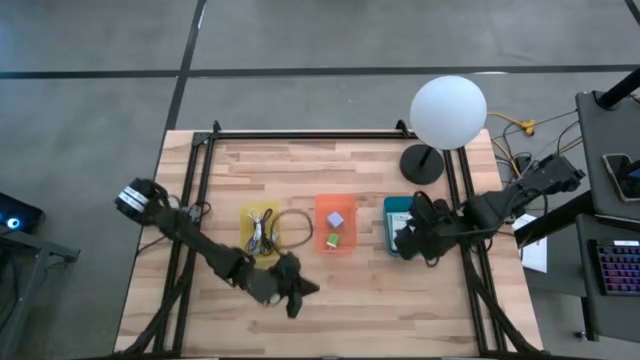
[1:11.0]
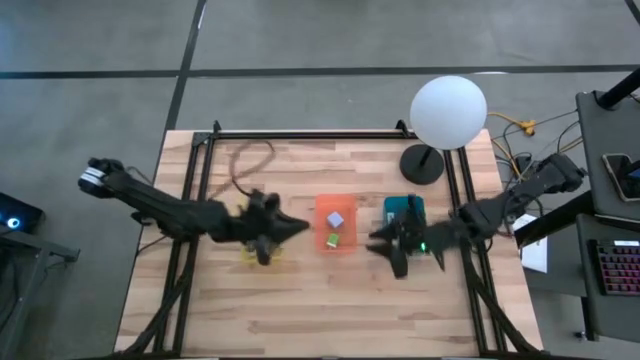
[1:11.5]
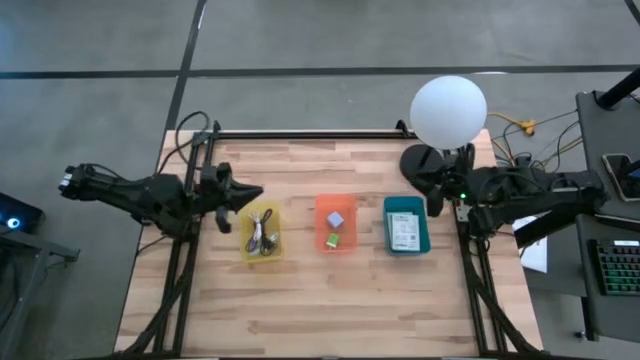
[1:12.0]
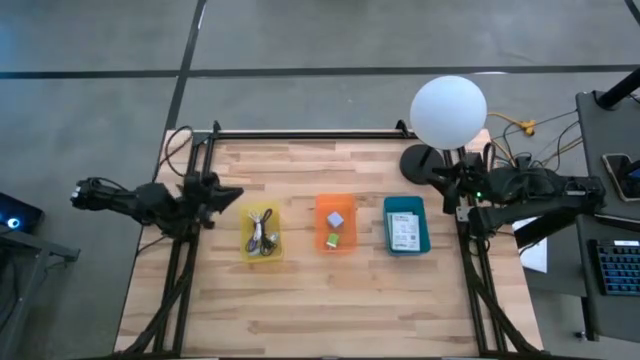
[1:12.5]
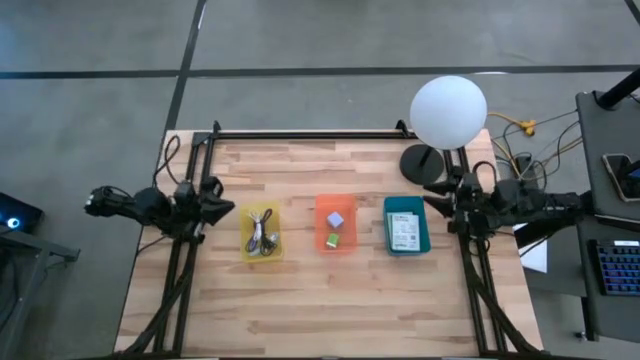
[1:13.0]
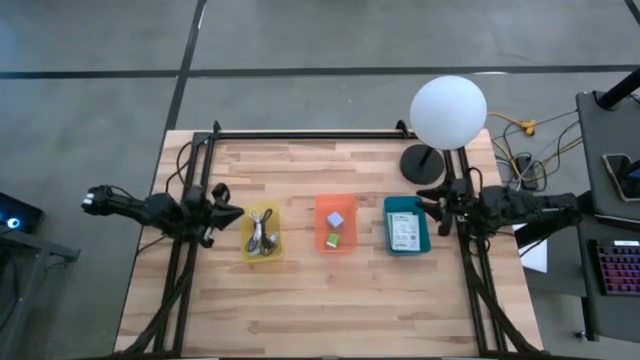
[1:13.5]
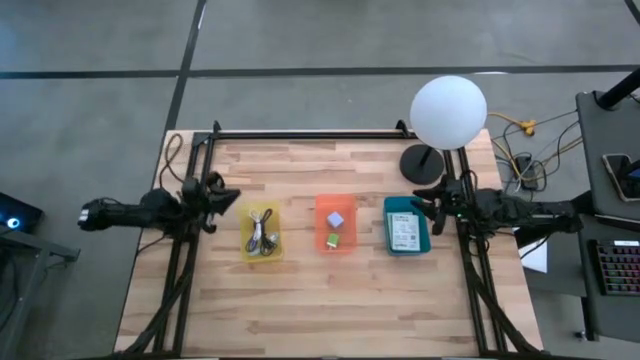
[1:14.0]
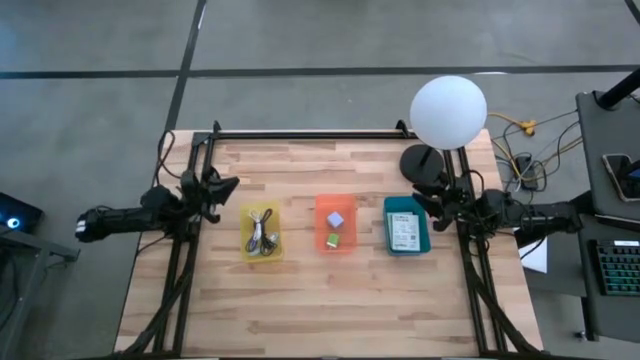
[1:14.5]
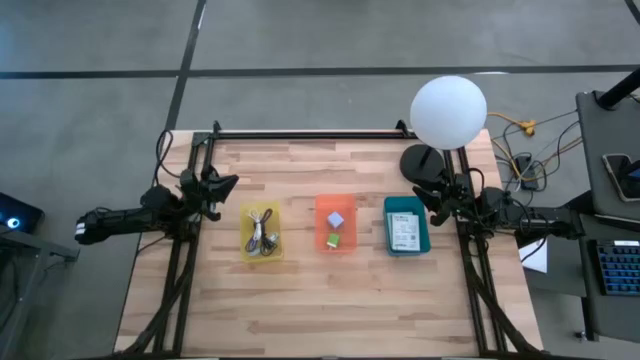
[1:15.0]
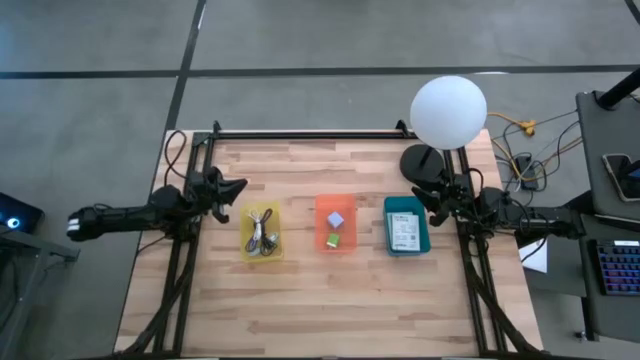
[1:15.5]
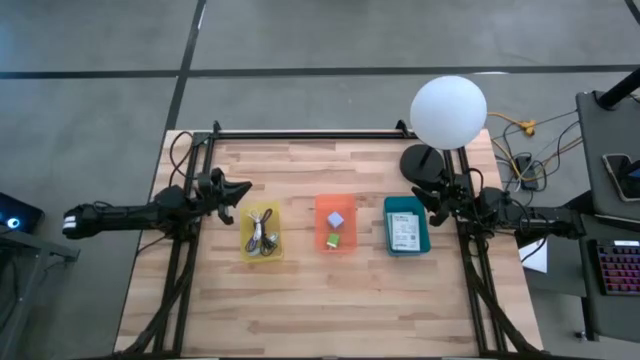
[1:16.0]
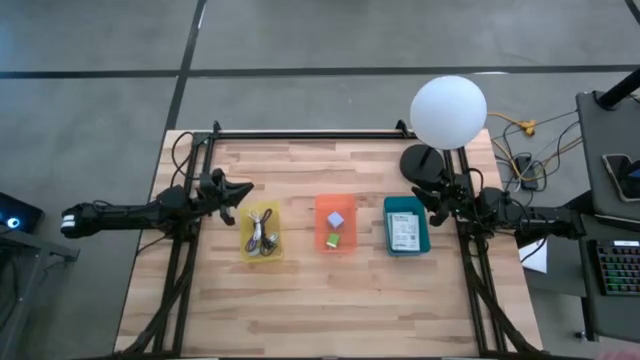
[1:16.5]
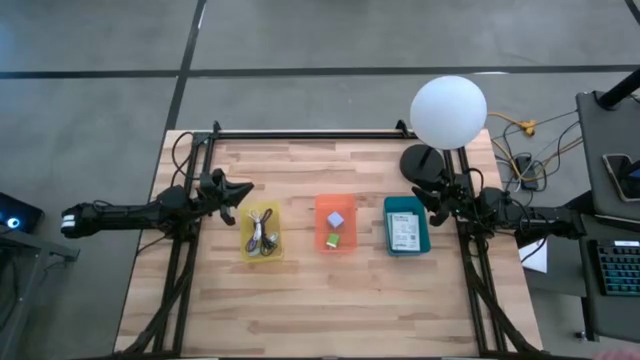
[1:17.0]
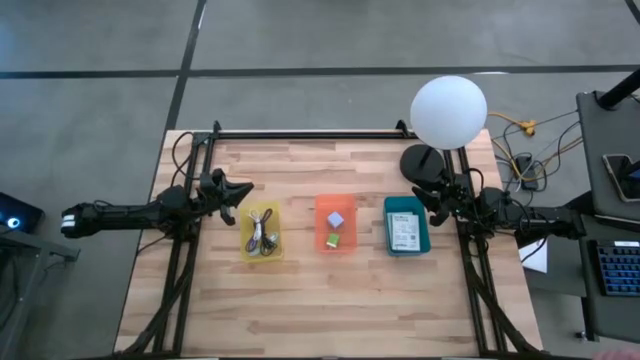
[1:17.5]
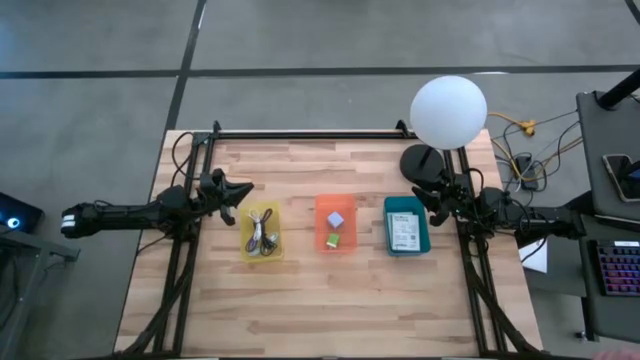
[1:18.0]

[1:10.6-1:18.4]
Task: Pick and place items into bin
Return to Home Position

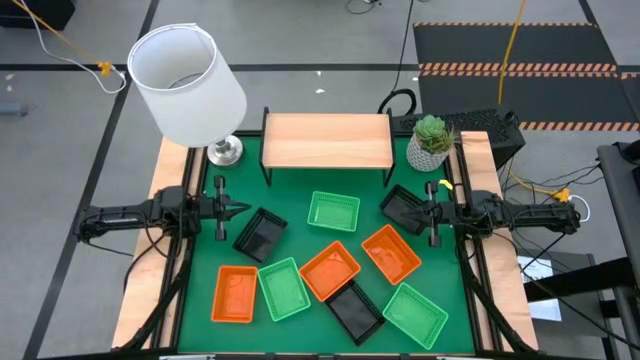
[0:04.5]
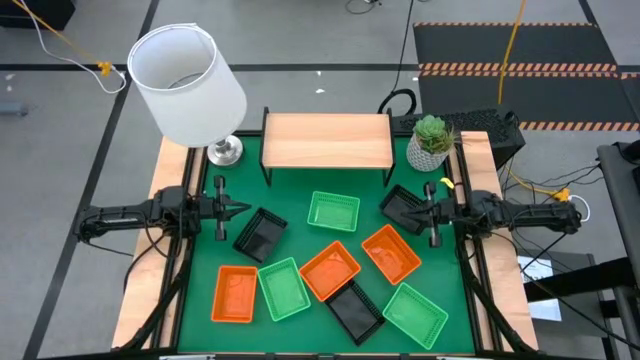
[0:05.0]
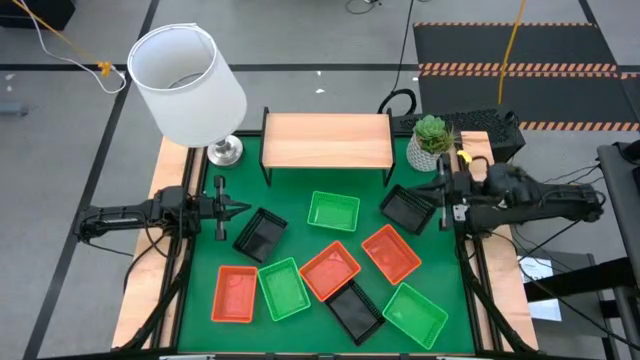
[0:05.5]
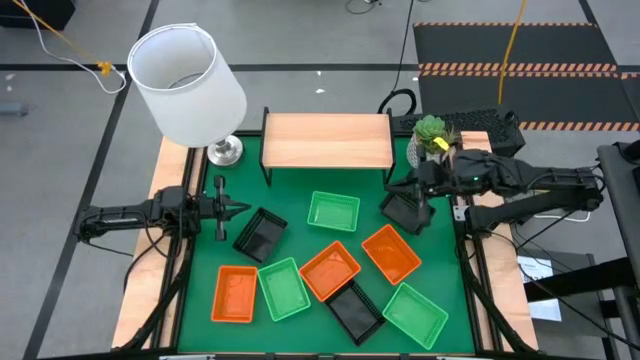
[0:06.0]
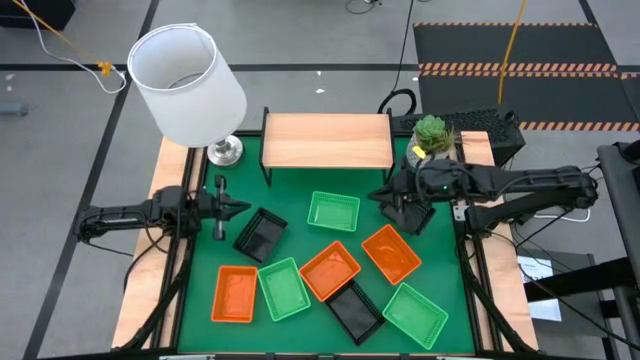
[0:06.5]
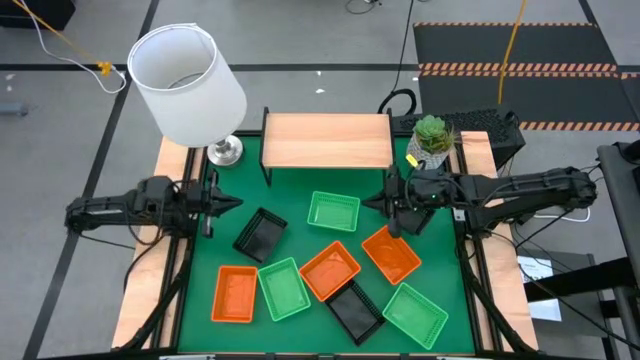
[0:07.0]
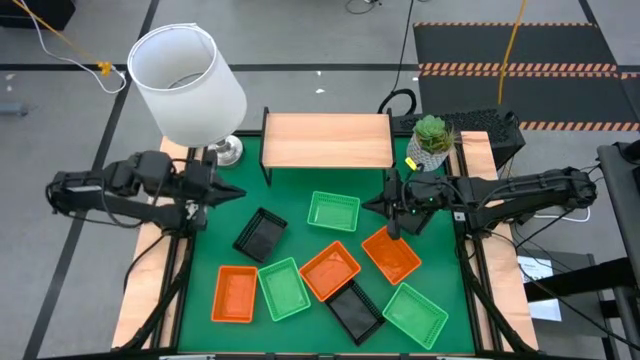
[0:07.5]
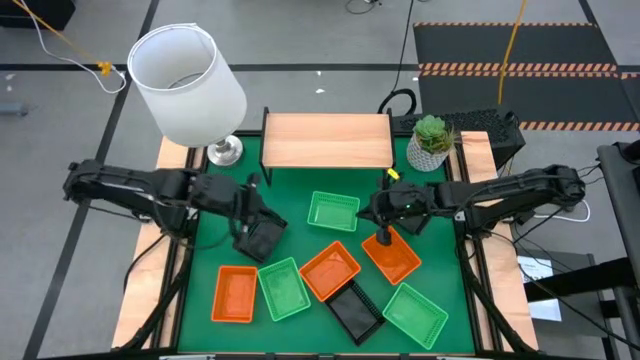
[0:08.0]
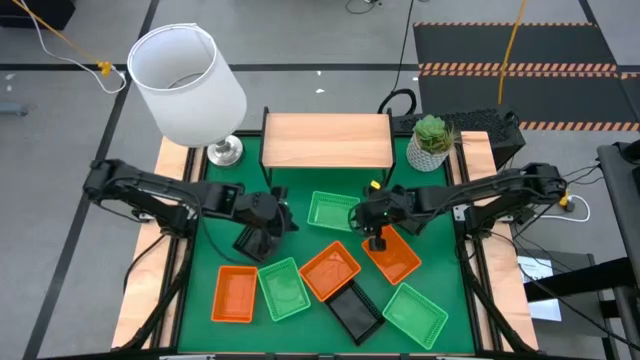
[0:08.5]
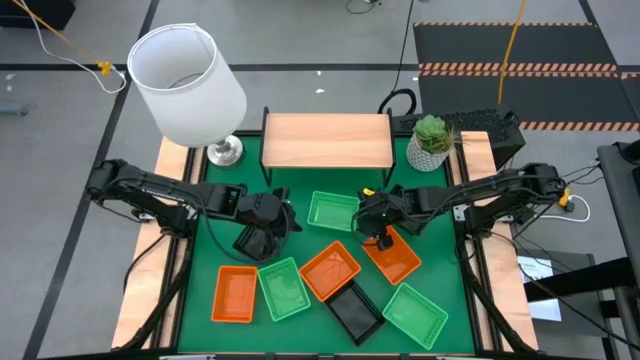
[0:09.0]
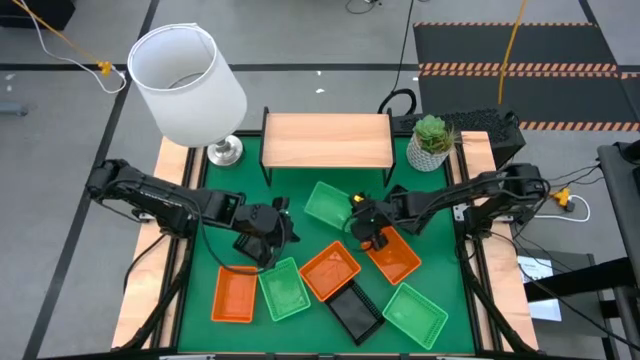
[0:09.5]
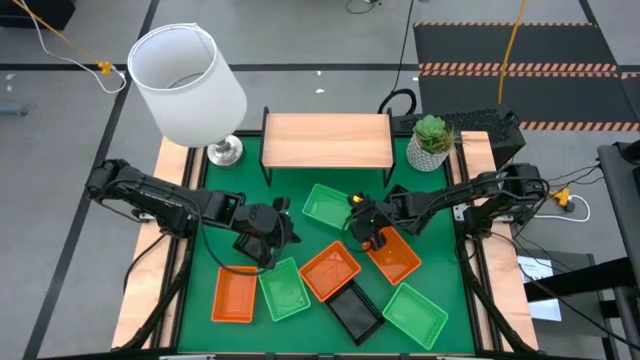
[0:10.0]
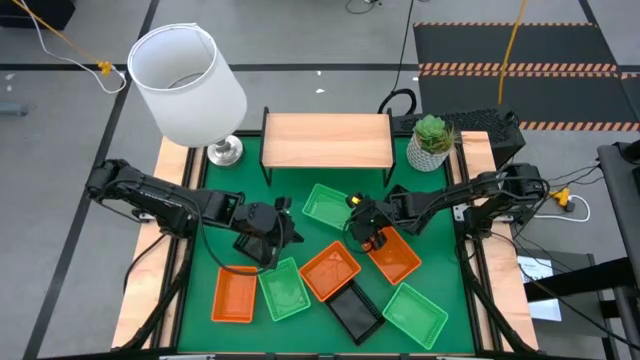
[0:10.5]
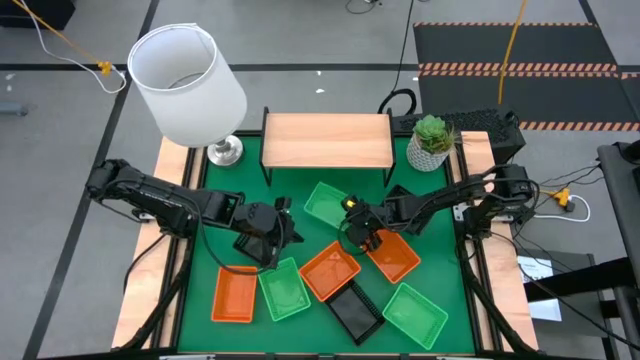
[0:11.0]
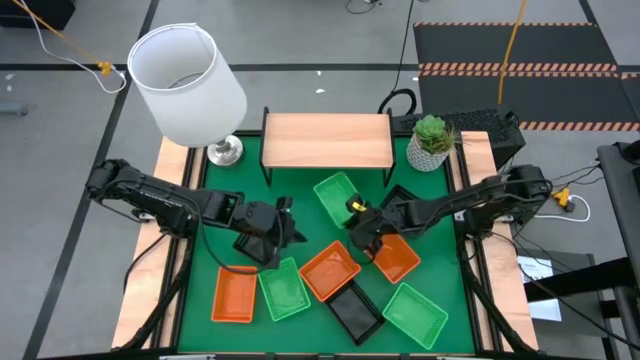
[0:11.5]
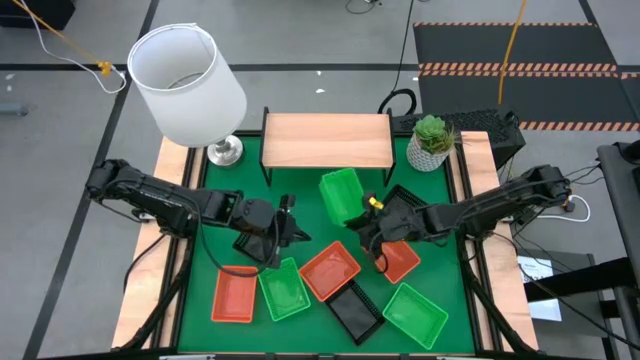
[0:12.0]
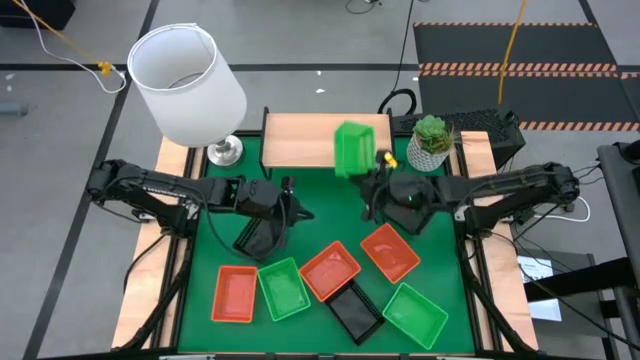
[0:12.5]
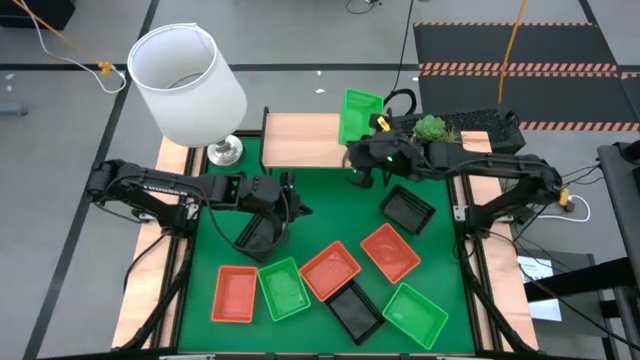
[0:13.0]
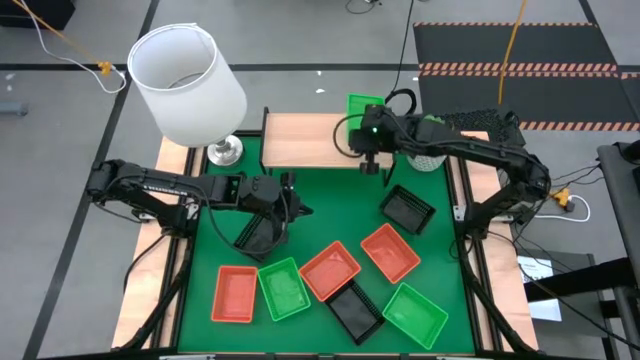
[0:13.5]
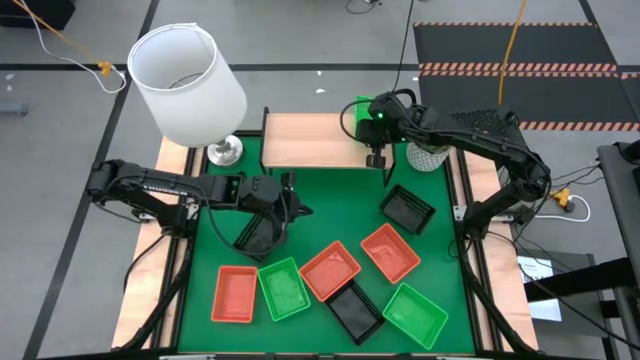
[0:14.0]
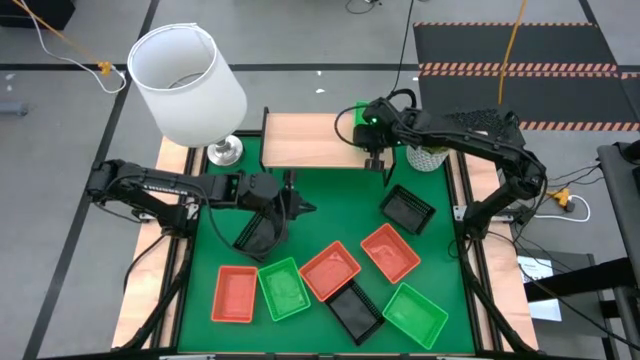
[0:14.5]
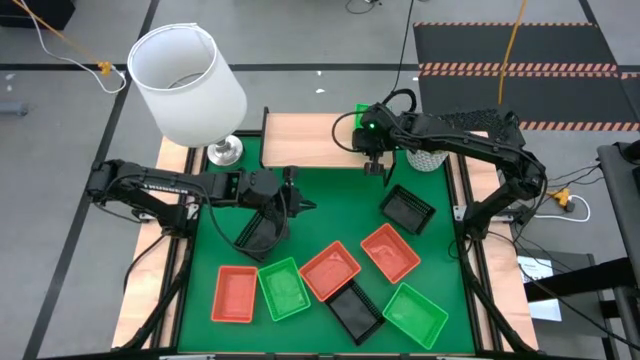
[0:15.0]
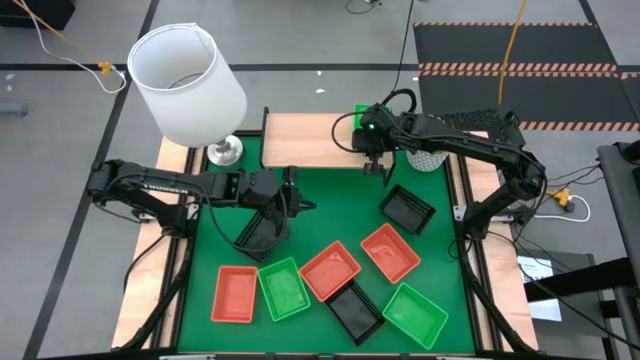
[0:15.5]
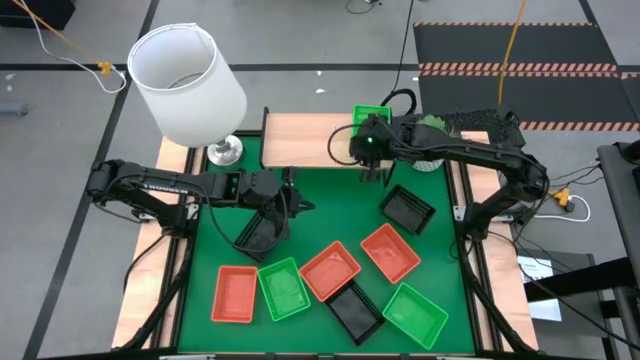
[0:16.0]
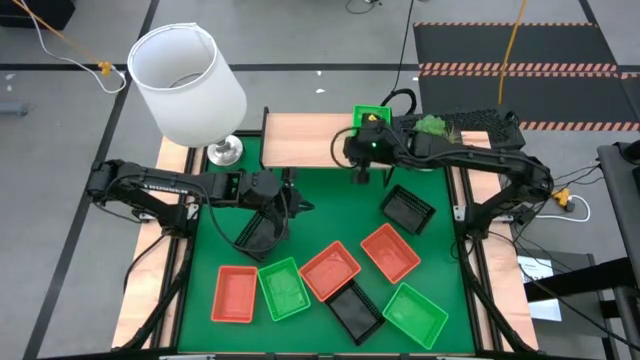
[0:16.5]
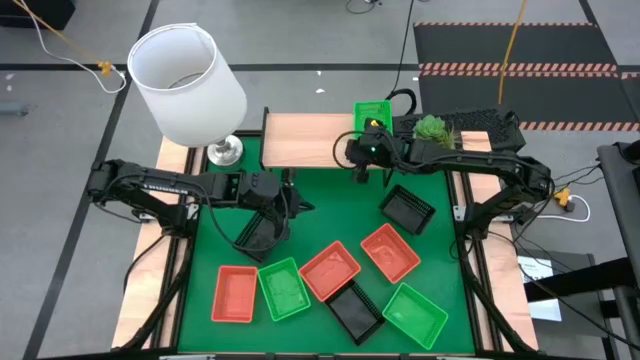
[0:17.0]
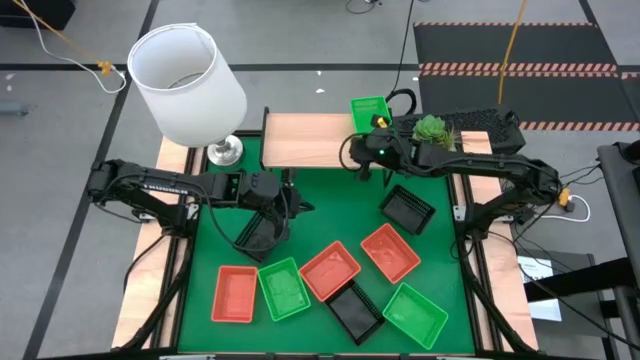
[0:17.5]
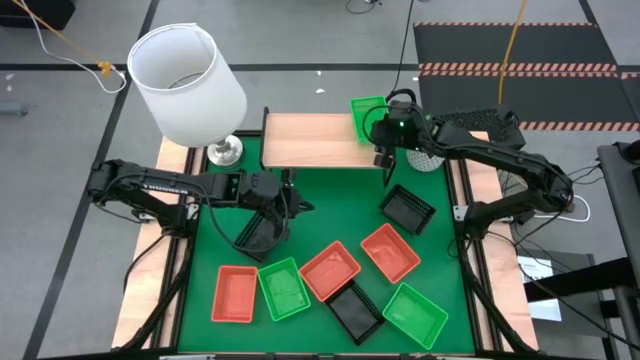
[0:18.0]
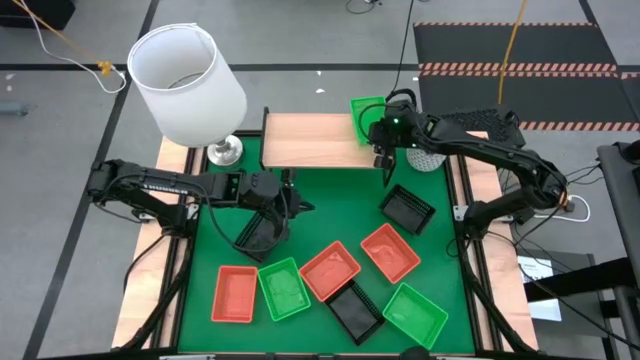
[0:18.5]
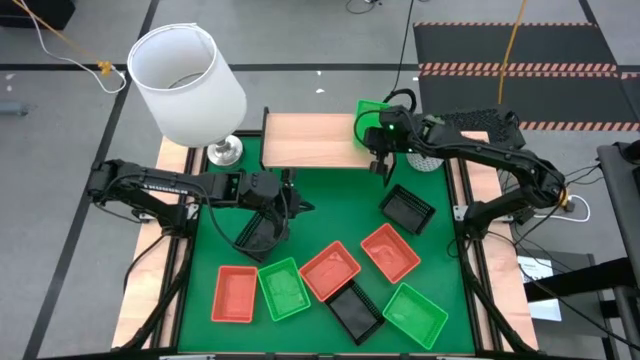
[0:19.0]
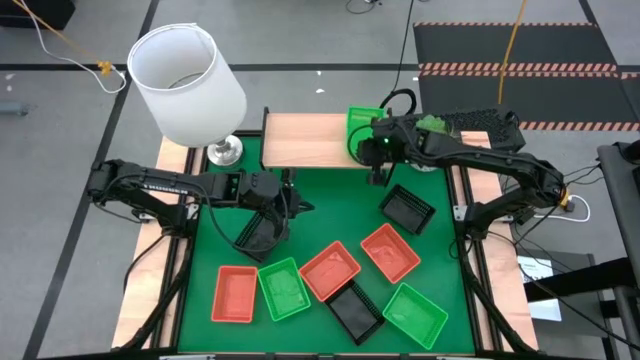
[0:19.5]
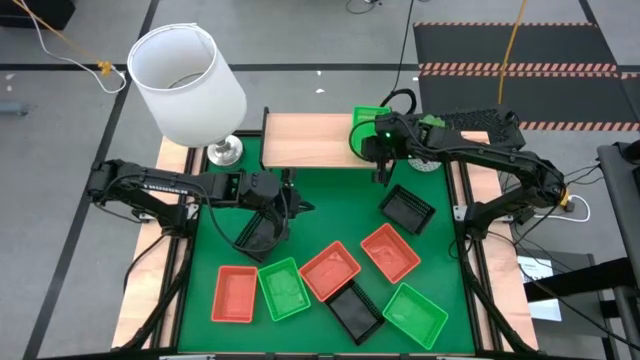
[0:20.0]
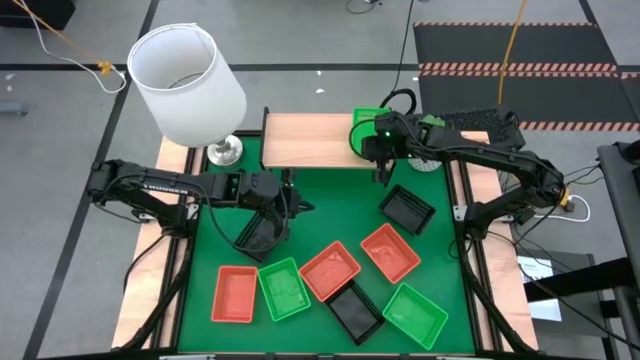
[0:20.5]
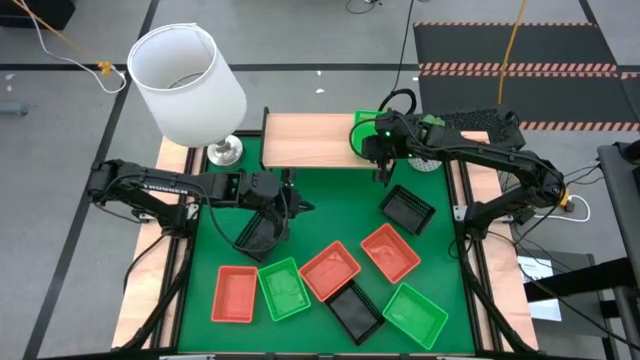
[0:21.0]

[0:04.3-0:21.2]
Task: Stack baskets on shelf by color
Put the top green basket on the shelf
